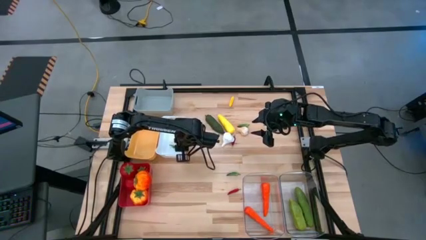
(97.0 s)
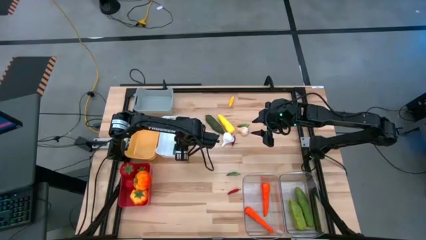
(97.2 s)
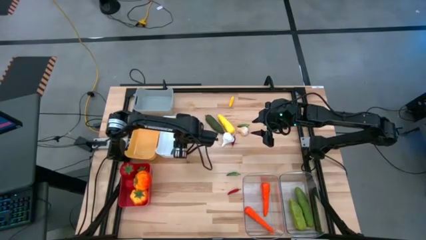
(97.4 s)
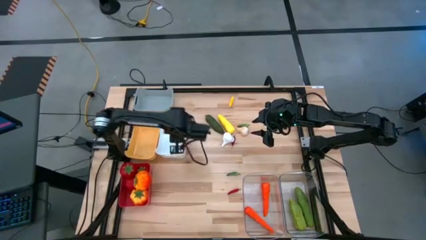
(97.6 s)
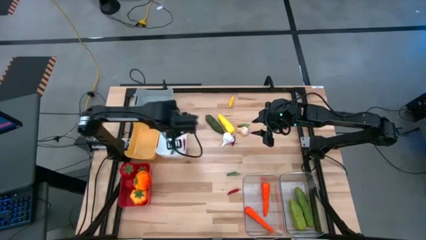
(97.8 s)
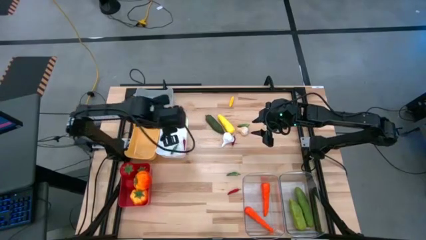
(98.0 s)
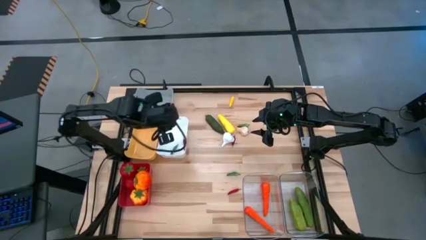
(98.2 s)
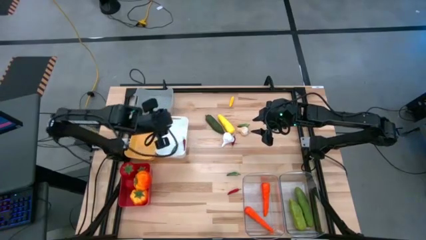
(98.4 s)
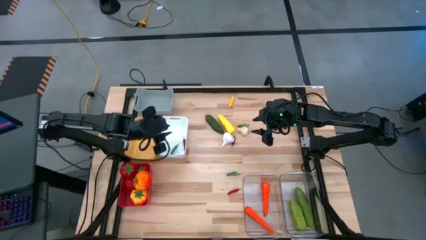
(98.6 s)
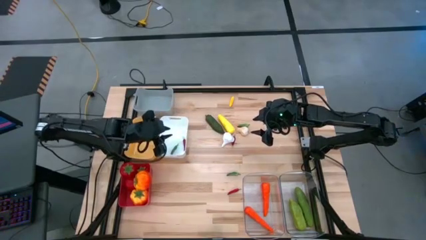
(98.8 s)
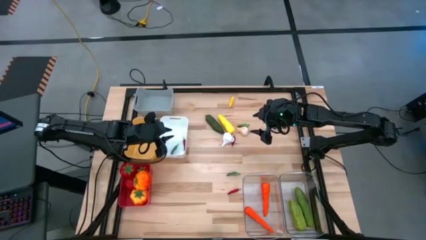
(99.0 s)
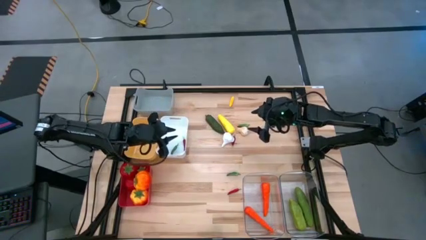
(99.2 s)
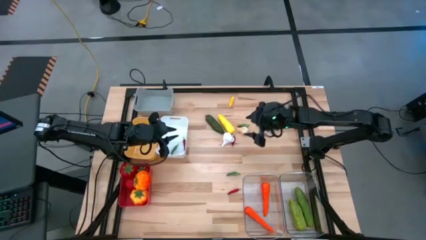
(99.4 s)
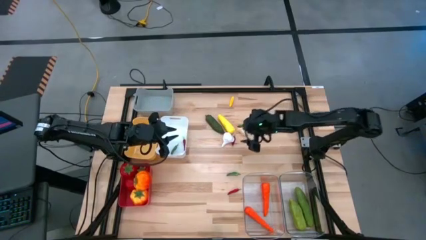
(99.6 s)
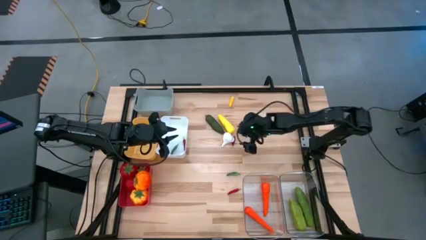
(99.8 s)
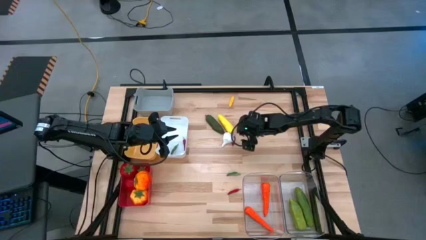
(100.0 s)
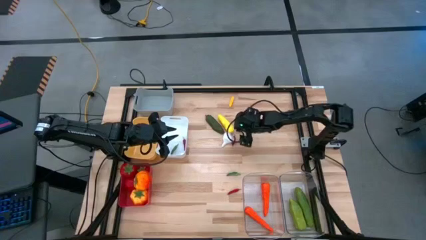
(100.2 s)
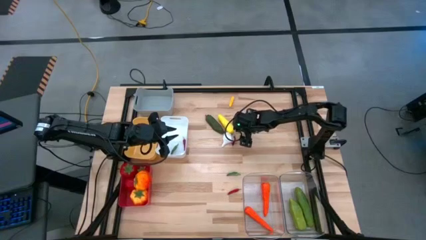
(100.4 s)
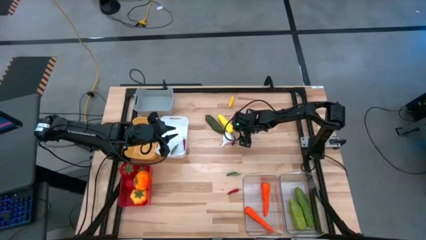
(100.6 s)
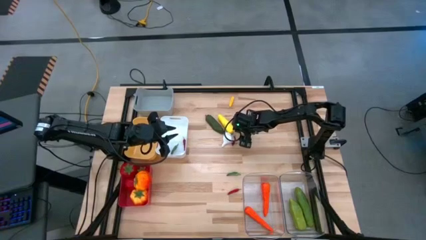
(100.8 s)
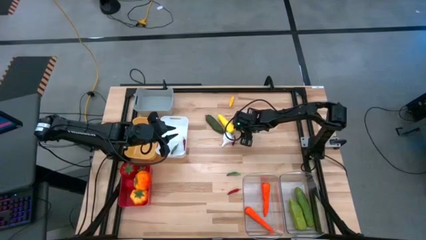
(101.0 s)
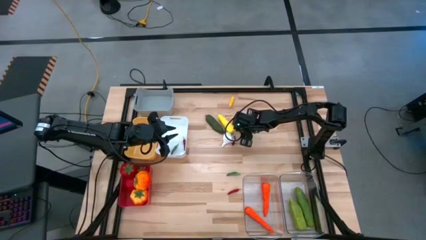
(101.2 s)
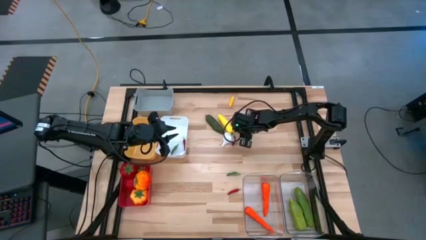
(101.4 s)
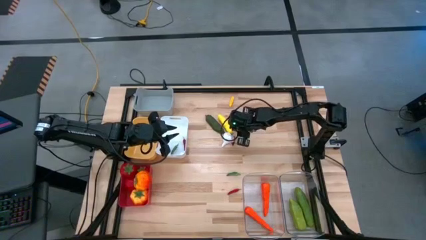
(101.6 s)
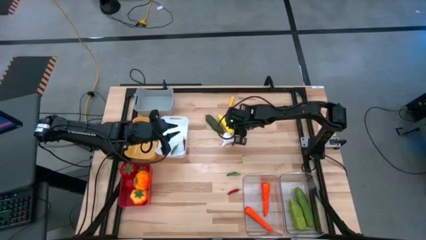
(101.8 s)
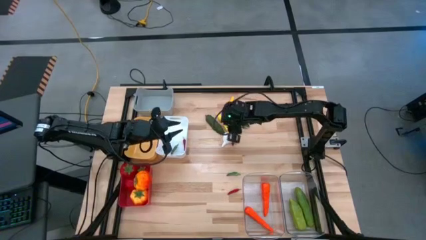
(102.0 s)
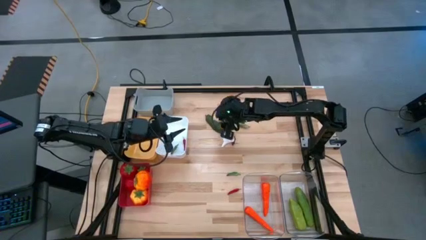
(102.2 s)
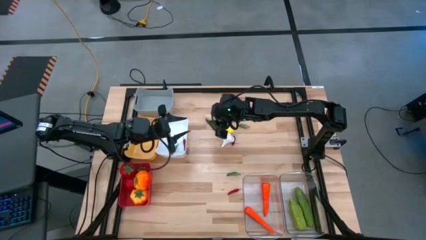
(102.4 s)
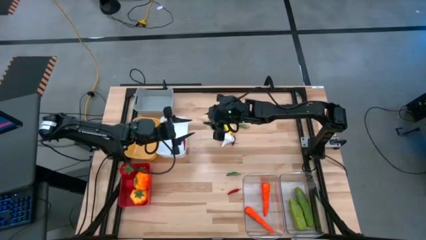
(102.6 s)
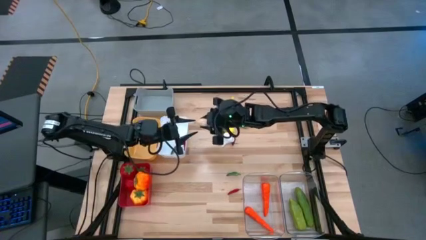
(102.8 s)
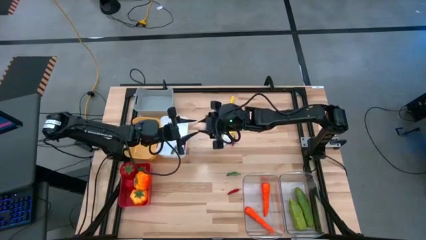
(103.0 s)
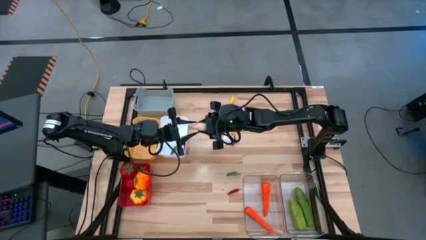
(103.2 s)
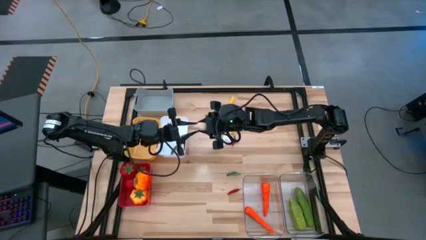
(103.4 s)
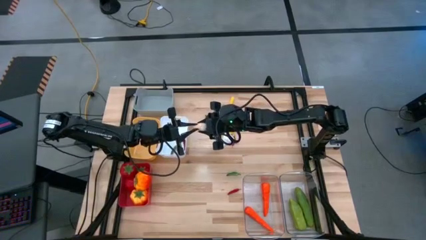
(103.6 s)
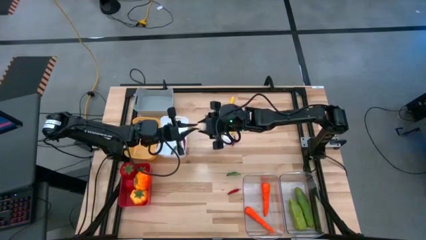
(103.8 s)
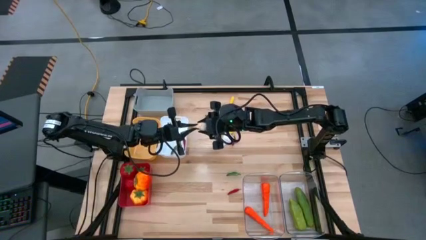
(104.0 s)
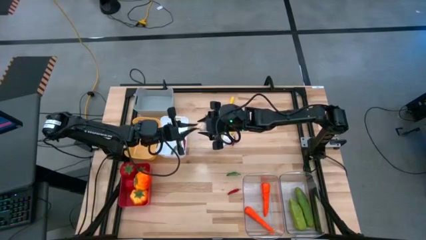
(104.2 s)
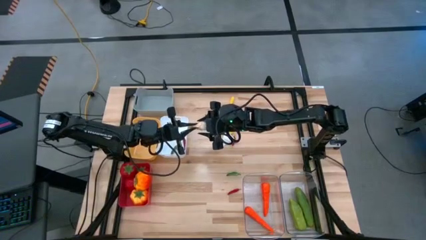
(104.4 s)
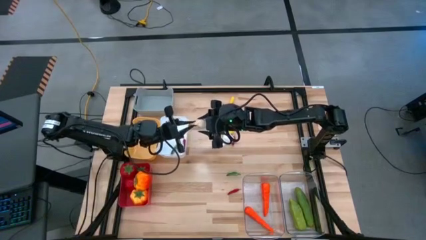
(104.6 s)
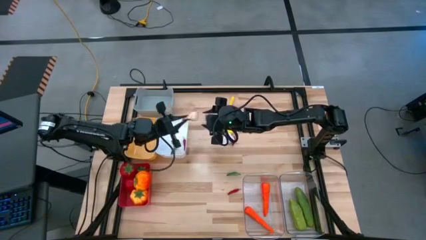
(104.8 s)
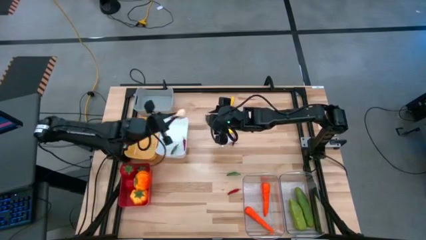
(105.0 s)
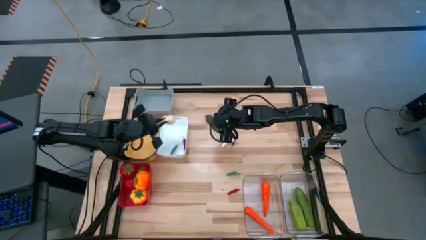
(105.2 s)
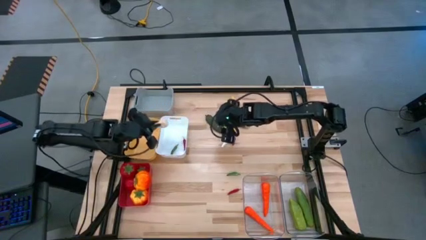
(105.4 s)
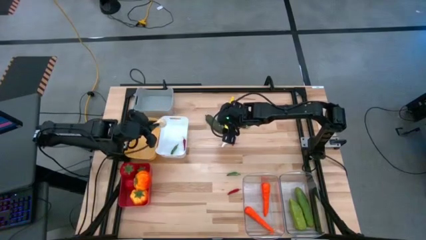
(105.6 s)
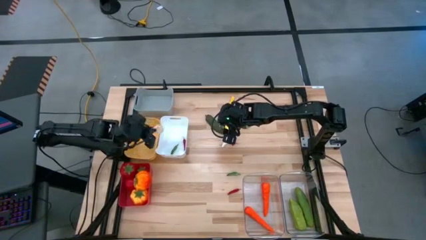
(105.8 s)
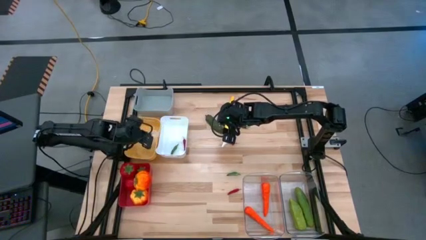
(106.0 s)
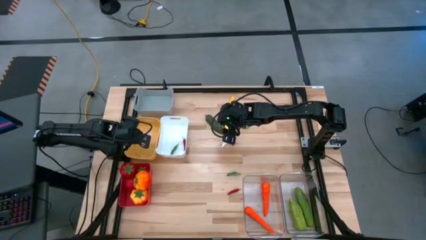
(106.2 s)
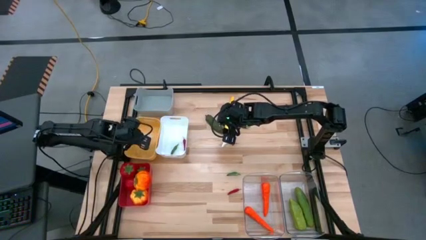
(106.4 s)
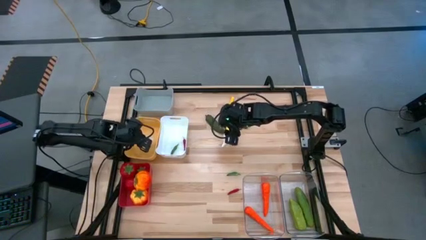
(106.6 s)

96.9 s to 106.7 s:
Task: Sort produce into baskets
Put the right white garlic into the yellow bin

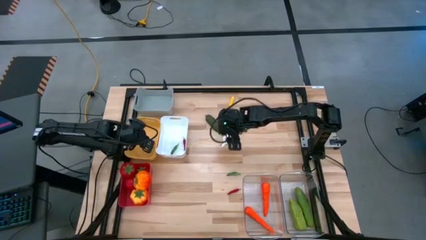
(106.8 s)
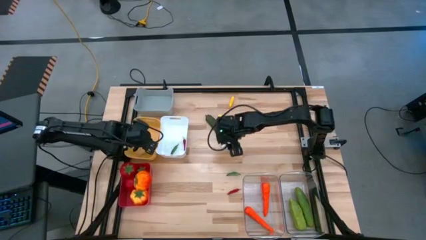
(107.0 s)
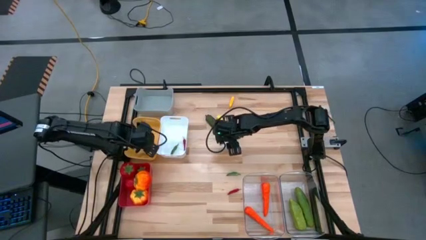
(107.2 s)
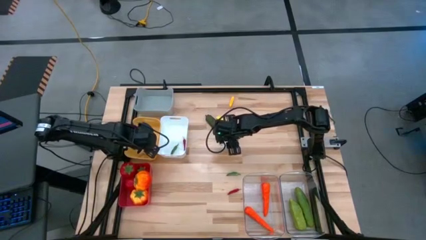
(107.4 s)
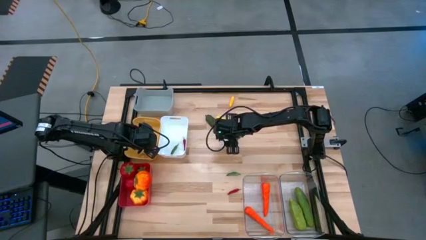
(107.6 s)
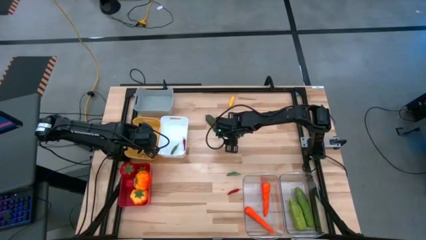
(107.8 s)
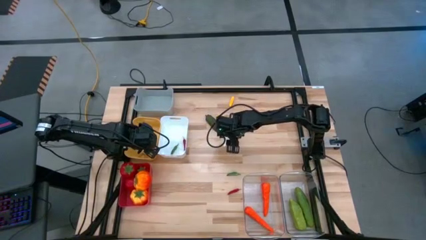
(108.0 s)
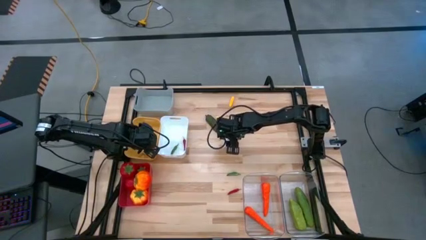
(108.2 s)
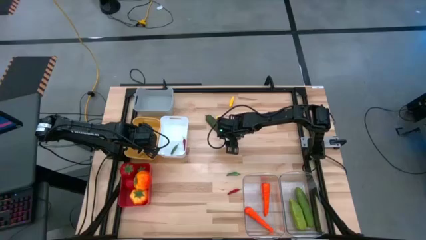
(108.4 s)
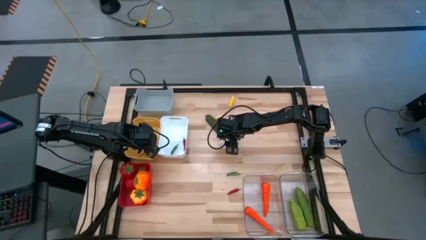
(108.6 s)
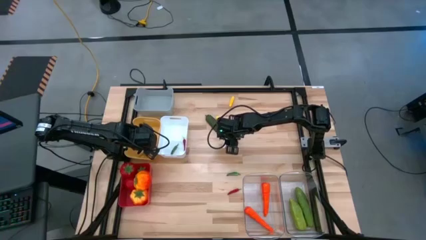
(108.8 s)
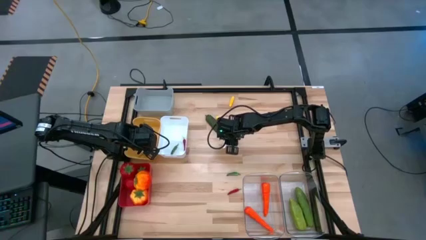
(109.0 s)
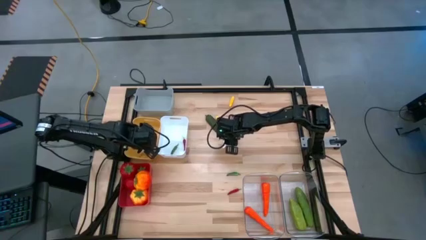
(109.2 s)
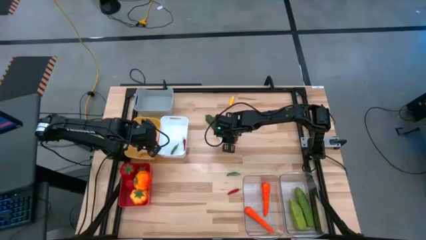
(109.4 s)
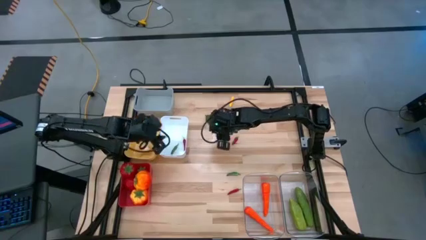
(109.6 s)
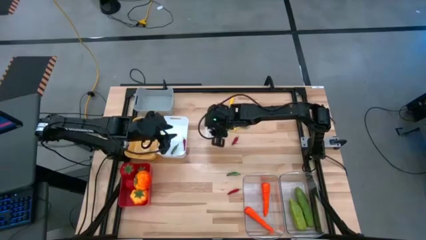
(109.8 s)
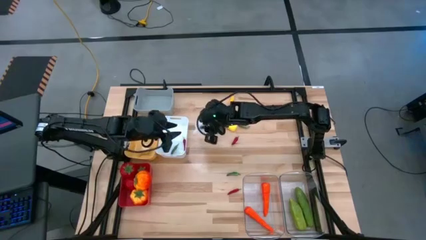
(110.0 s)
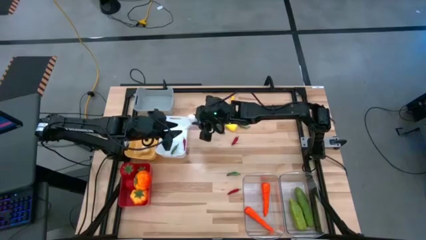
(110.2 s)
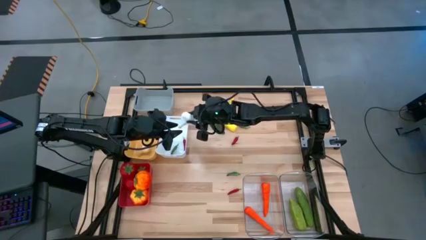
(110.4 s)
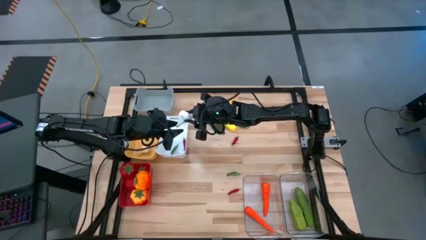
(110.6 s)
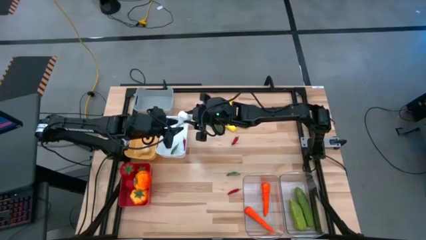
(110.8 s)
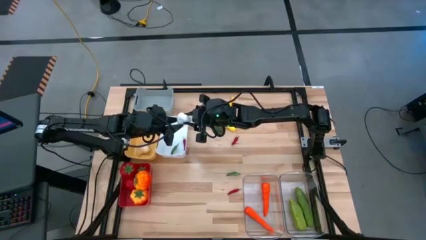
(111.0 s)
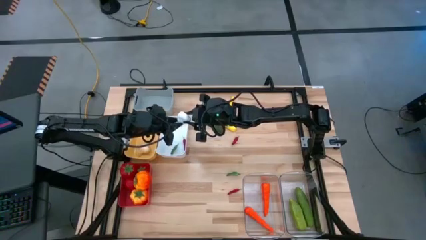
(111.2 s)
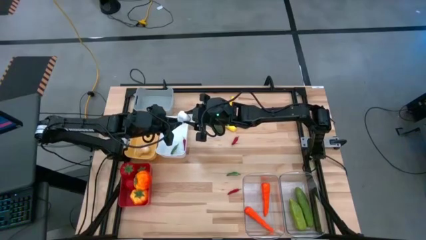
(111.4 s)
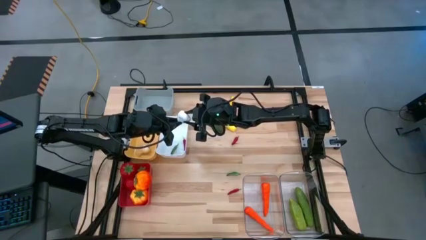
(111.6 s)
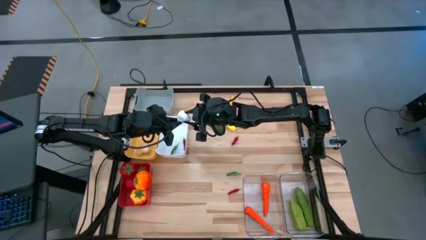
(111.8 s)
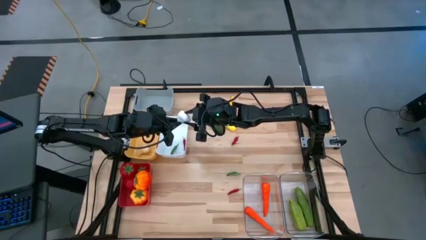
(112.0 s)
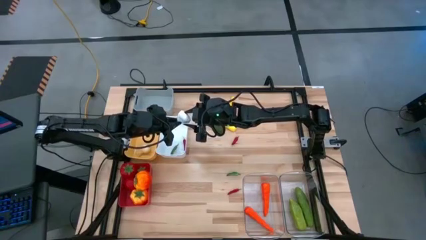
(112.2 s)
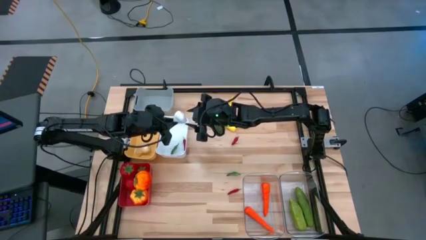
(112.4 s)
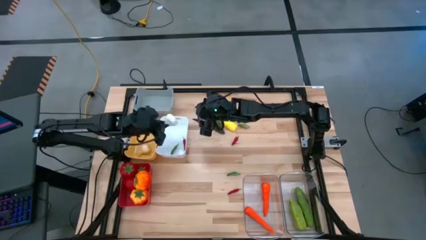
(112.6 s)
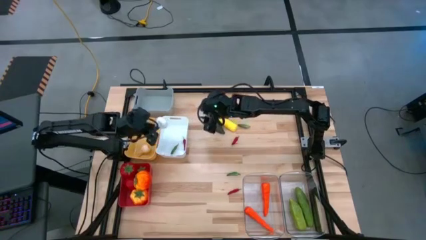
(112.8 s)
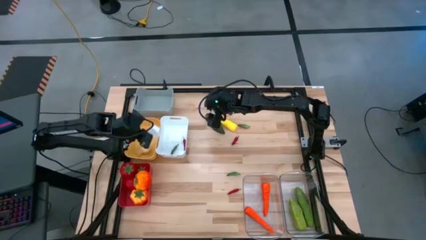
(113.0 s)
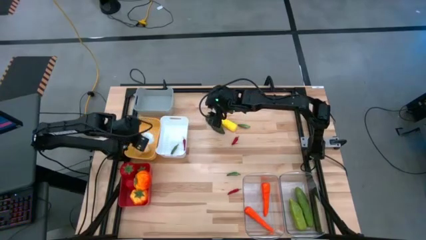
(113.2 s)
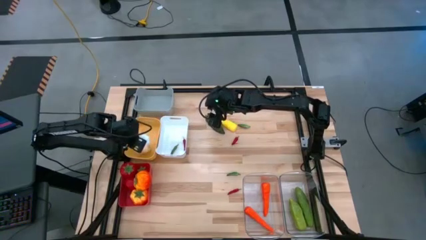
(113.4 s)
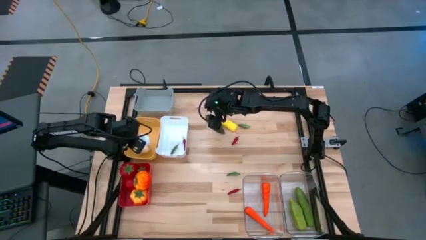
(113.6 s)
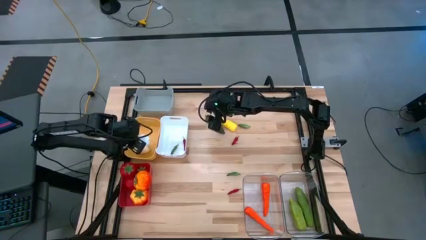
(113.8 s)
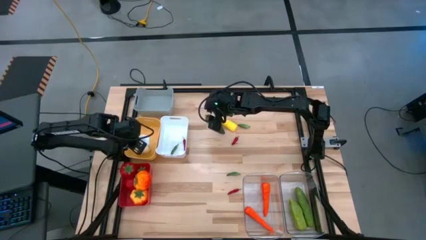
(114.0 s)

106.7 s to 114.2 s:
Put the white garlic into the yellow bin

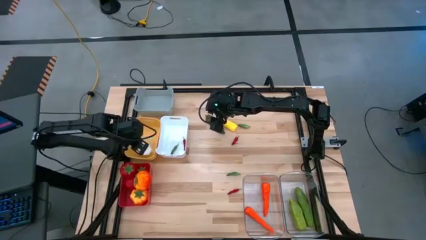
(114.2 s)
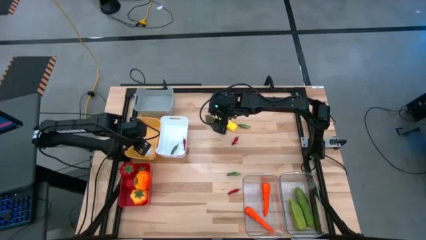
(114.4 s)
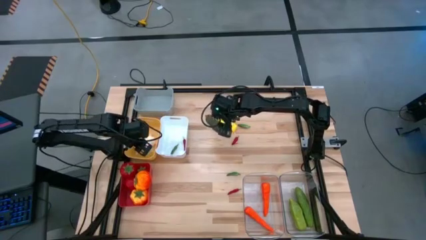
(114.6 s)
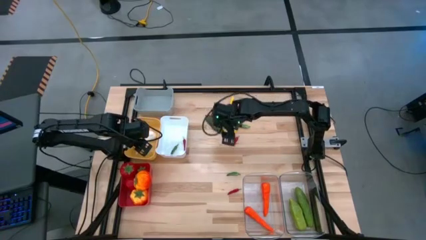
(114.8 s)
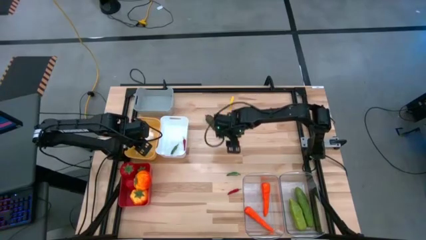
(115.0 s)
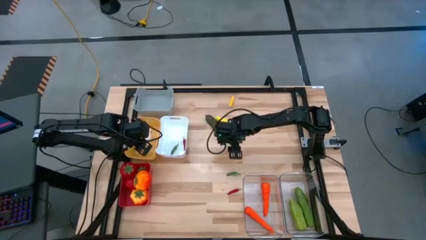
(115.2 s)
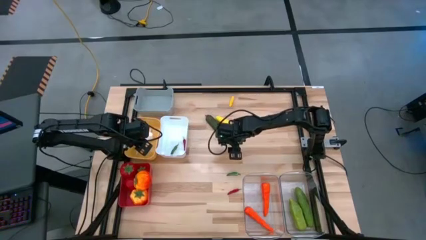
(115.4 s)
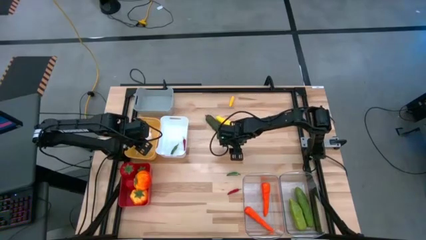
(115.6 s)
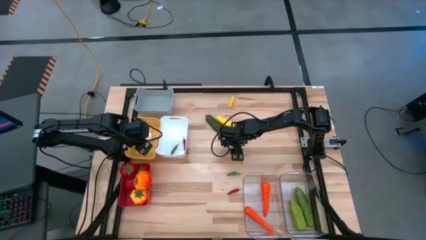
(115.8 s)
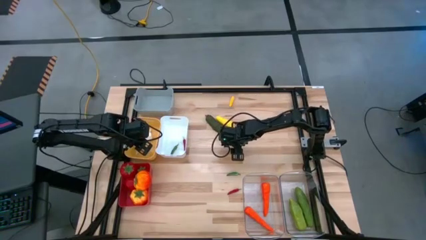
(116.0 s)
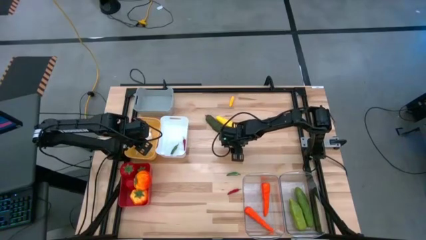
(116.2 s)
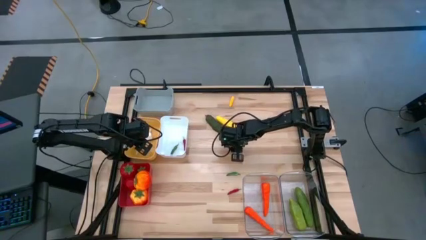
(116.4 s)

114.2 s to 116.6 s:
Put the top red chili pepper into the white bin
